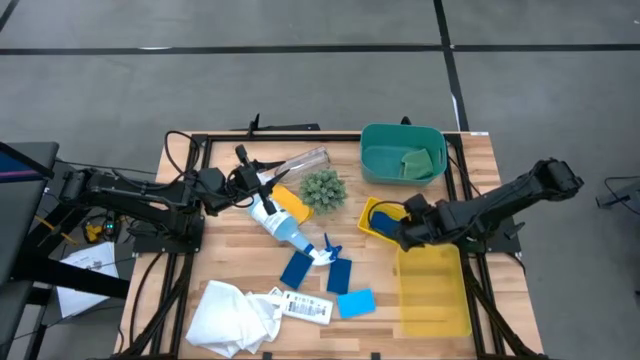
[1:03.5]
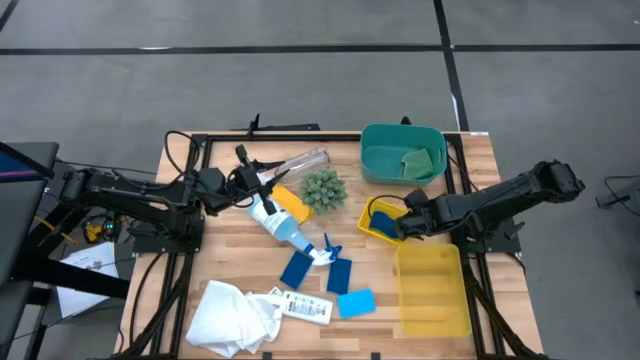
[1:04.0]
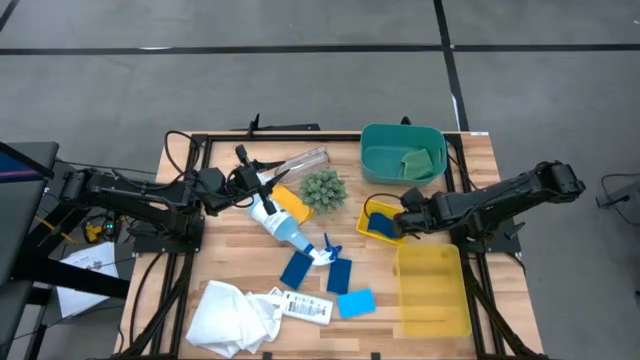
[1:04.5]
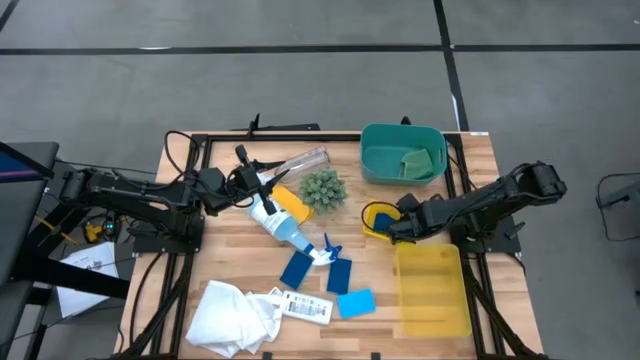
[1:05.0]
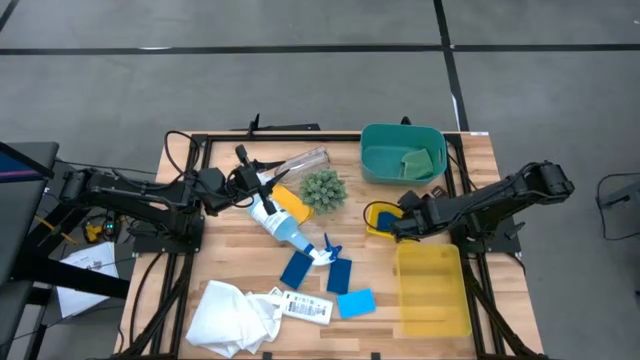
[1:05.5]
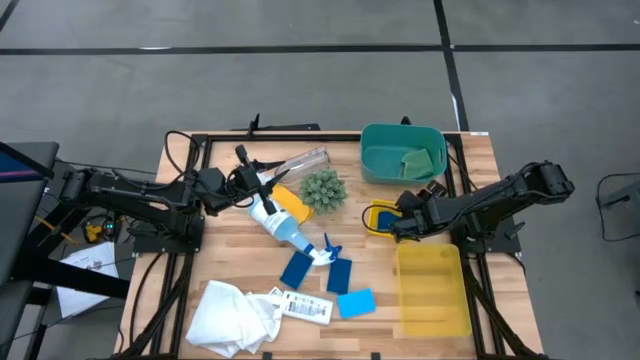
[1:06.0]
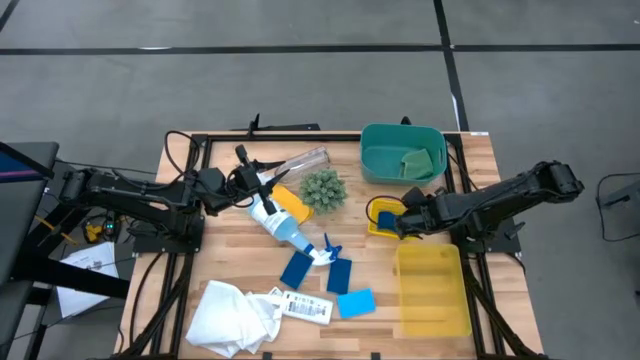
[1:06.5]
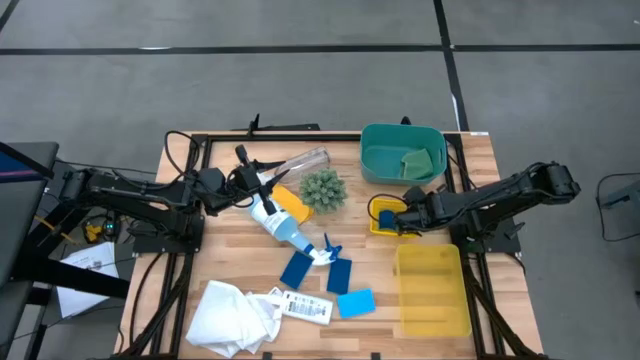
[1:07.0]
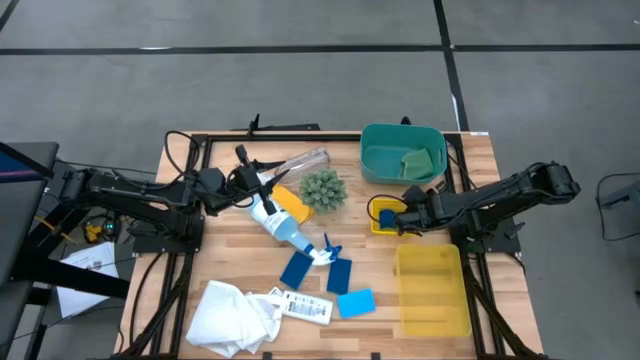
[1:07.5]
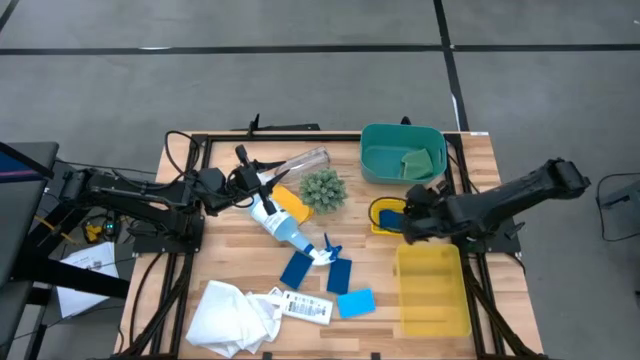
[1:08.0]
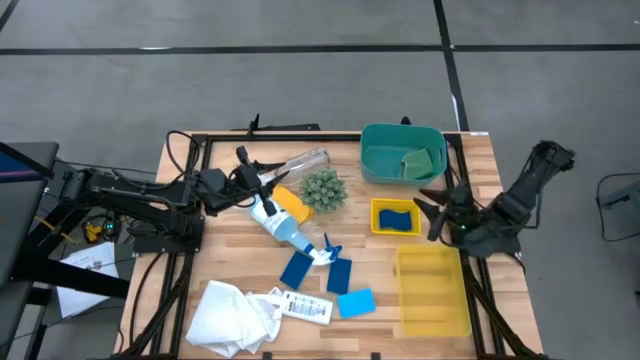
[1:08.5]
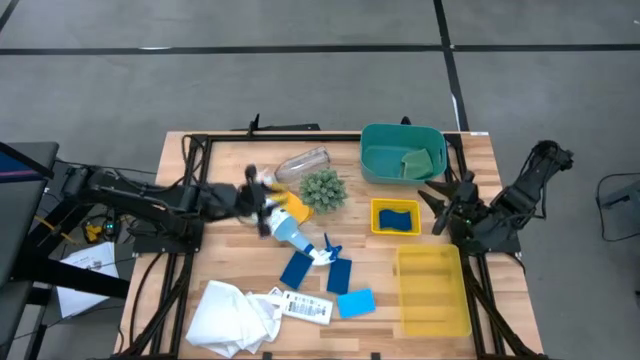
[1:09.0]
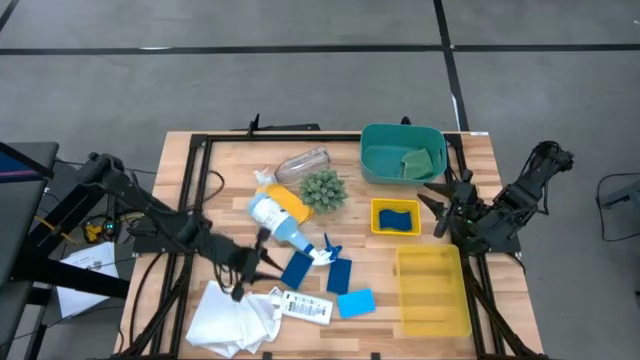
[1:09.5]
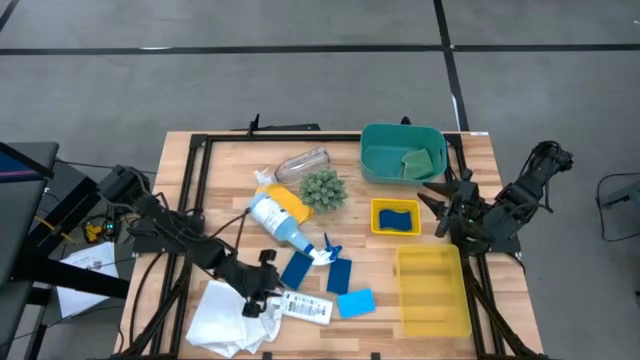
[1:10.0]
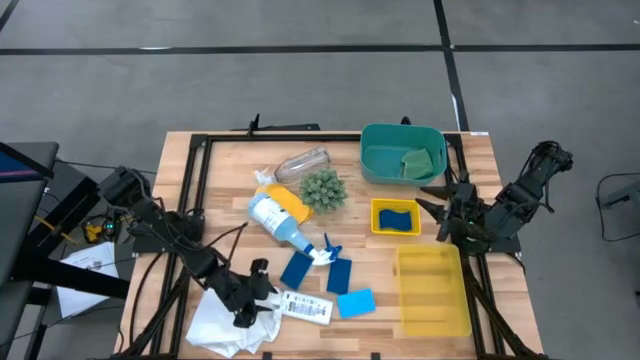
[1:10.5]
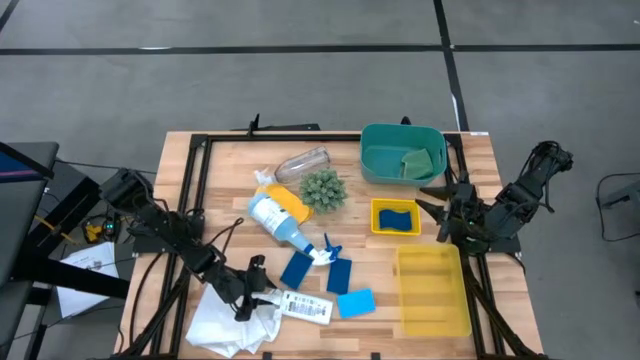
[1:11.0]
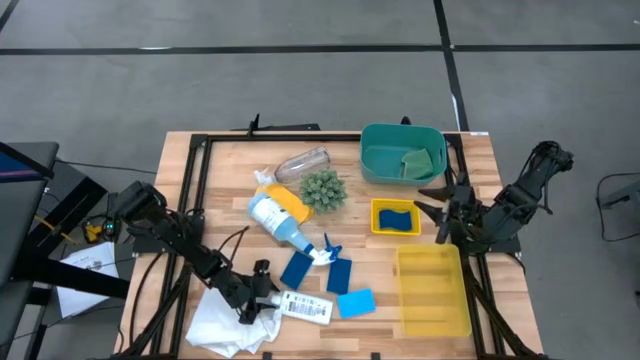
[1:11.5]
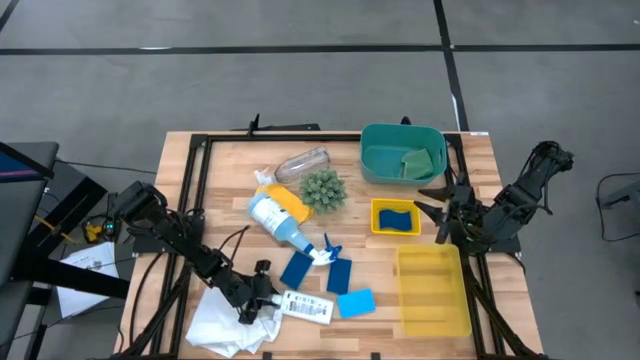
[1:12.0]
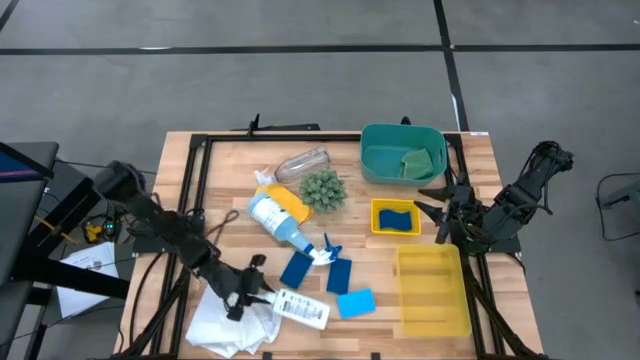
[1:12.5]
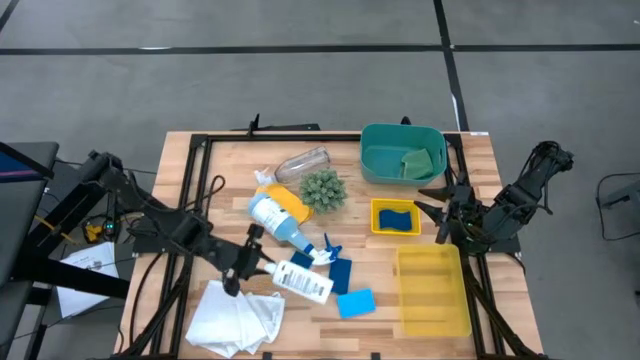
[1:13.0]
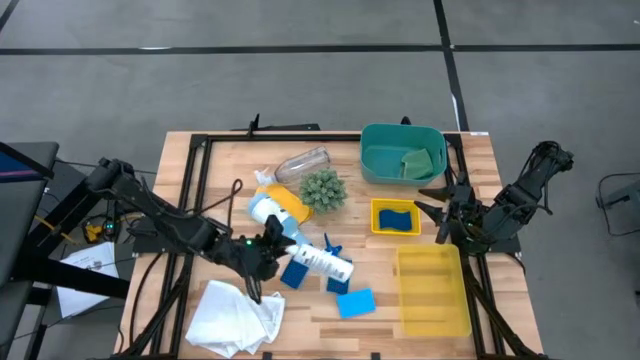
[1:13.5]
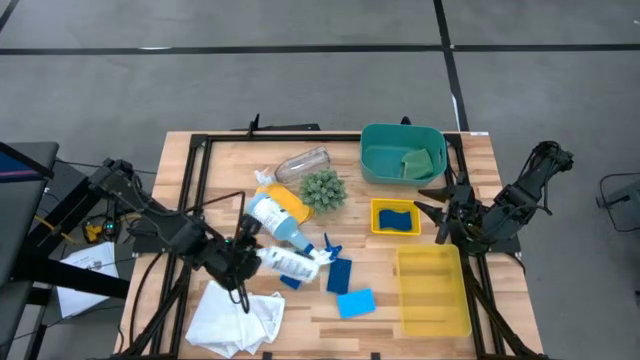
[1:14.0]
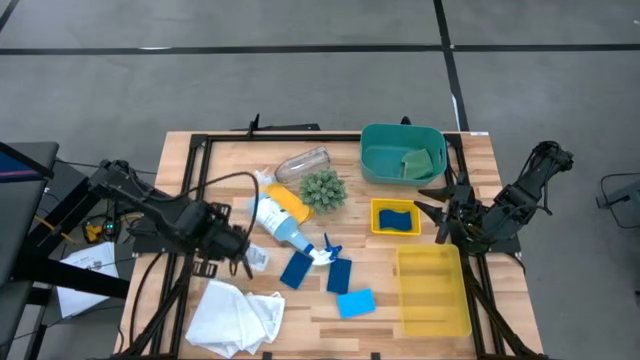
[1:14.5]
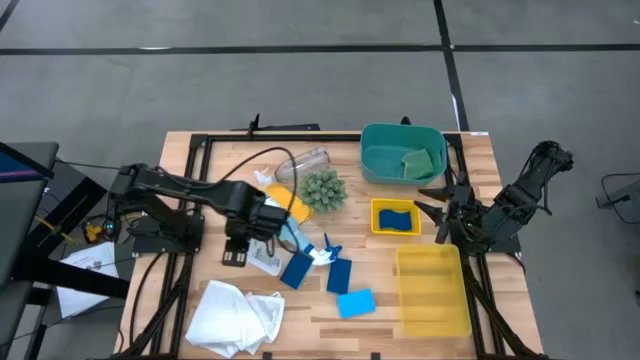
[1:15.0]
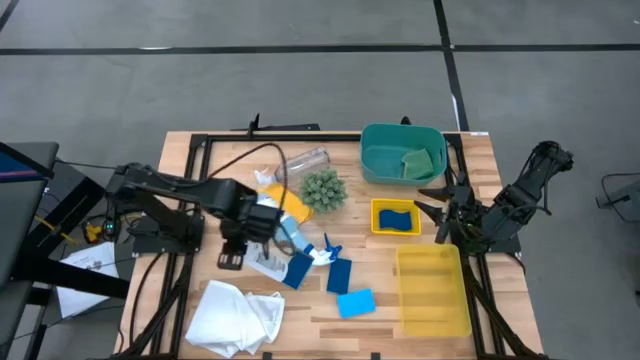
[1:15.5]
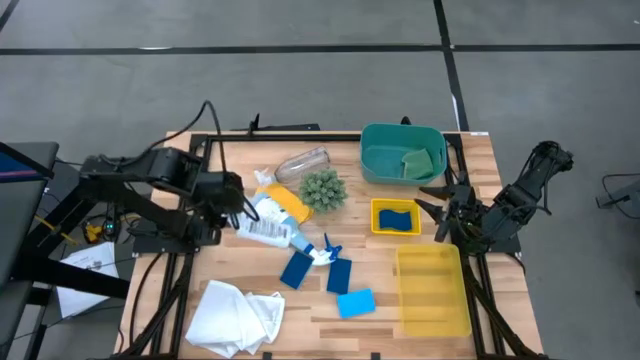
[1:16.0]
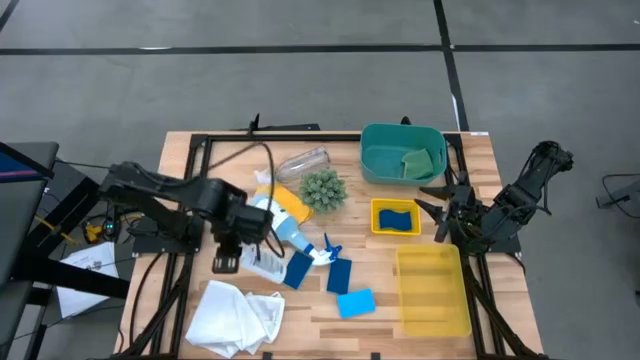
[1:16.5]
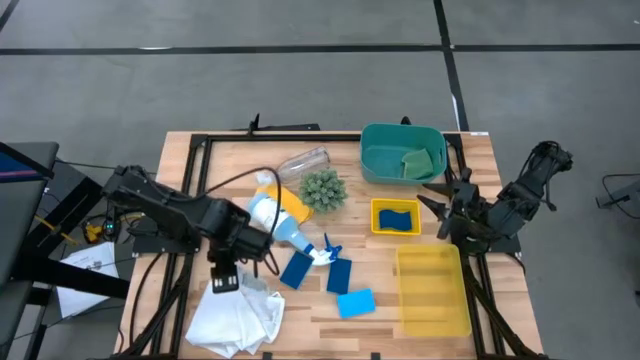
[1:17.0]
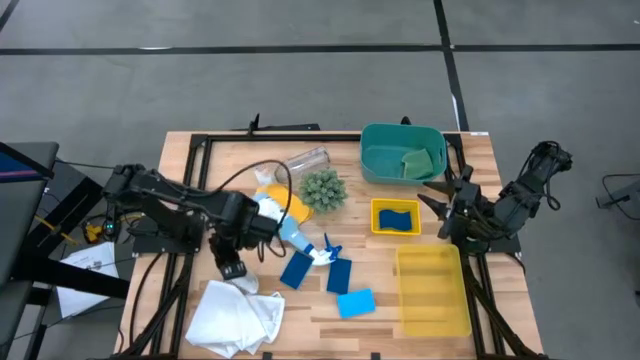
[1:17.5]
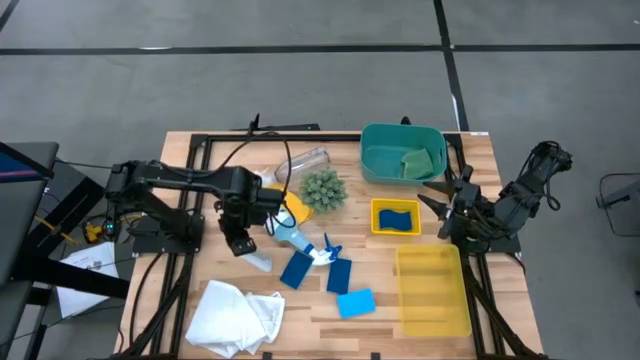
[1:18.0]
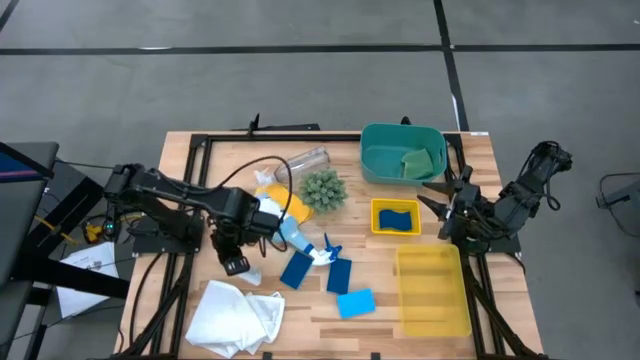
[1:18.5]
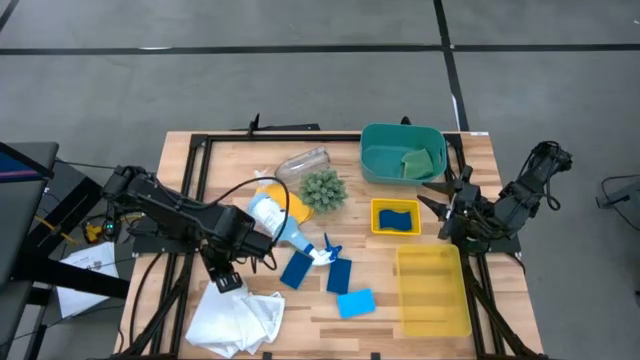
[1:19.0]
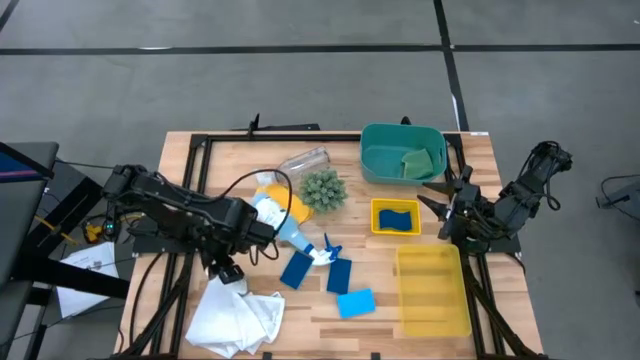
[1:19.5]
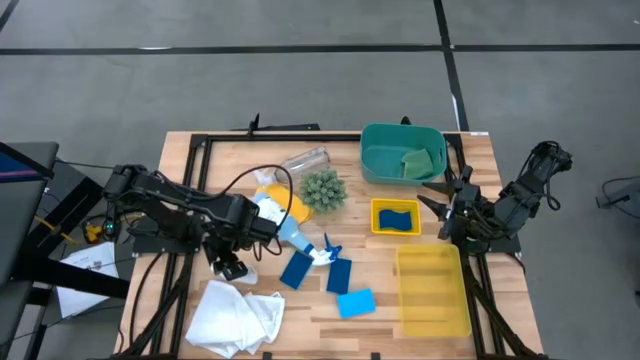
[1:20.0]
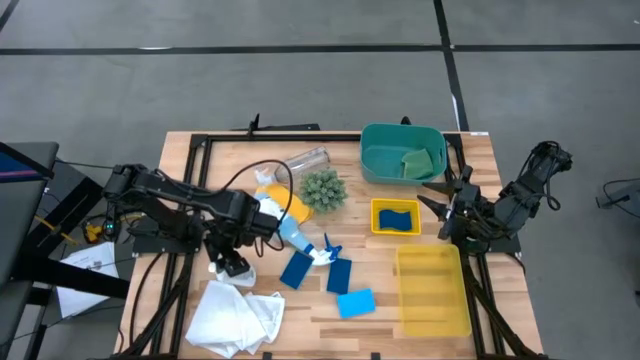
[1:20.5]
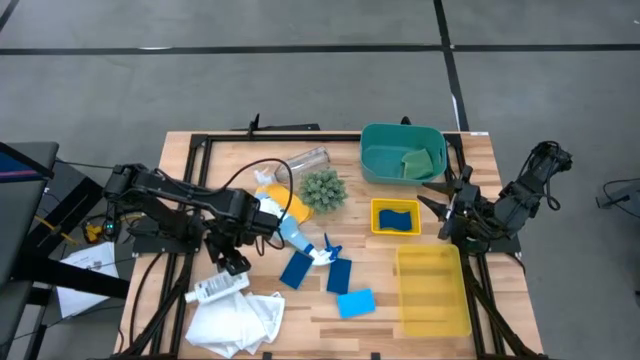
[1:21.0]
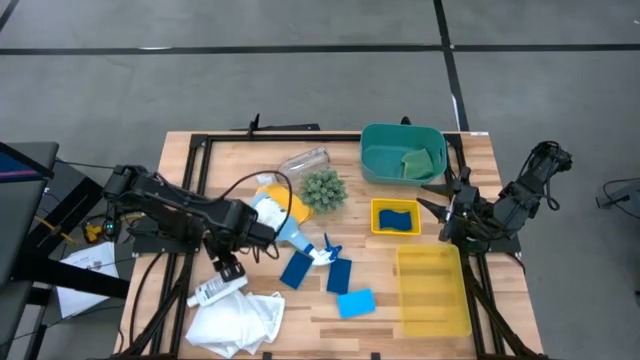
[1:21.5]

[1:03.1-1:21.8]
Task: Pick & Place Kitchen Items
Put the white bottle into the yellow bin

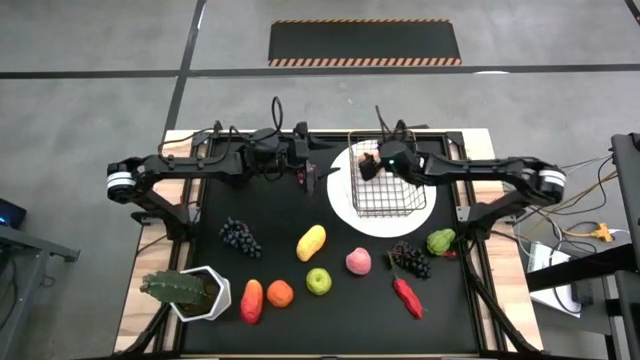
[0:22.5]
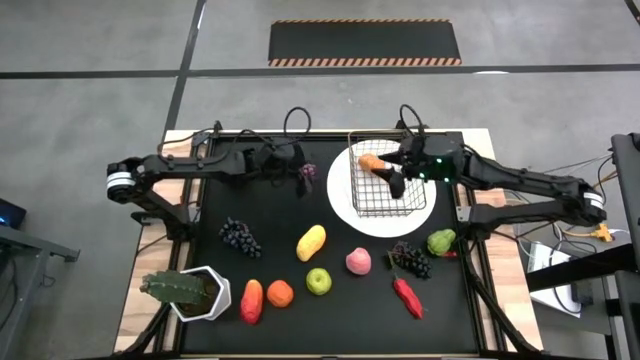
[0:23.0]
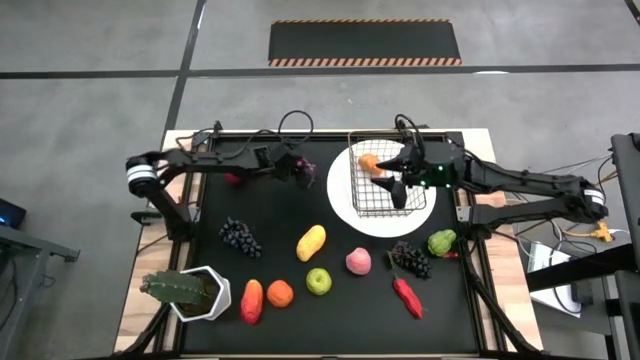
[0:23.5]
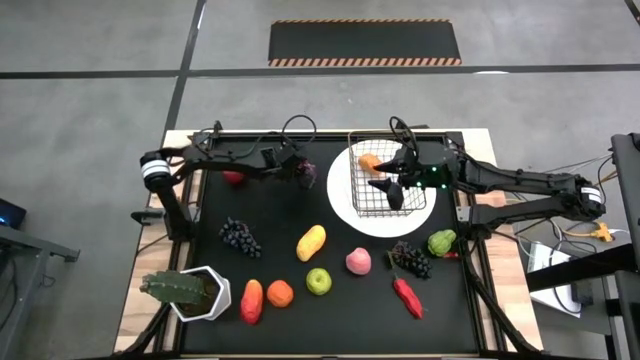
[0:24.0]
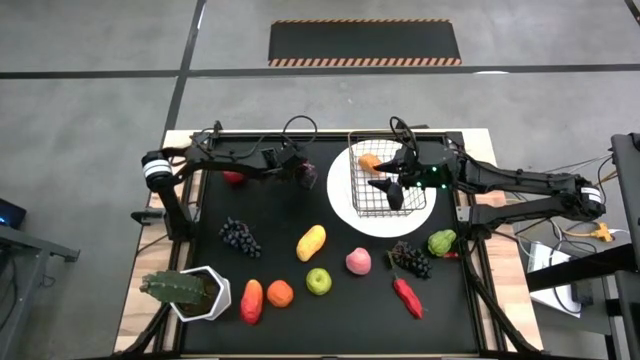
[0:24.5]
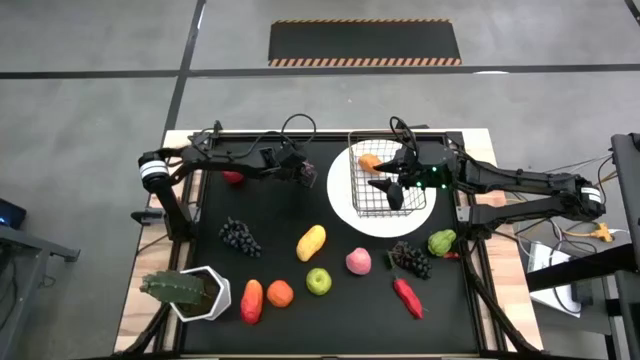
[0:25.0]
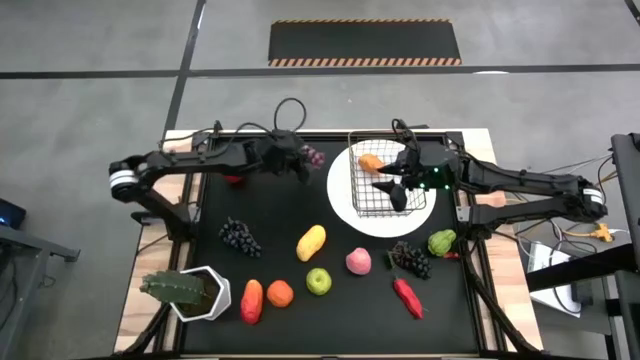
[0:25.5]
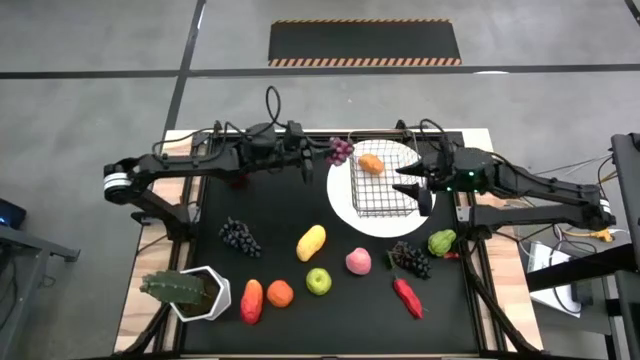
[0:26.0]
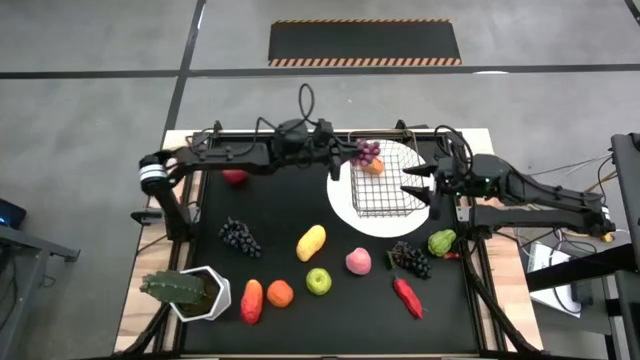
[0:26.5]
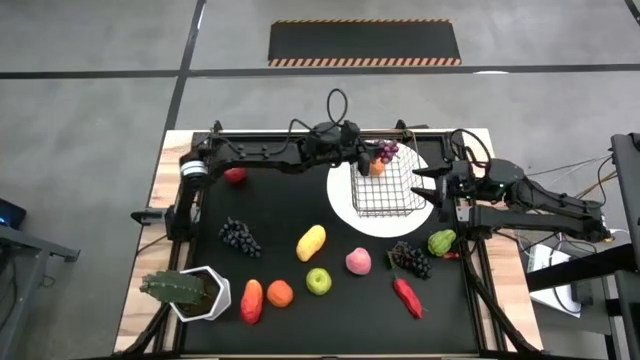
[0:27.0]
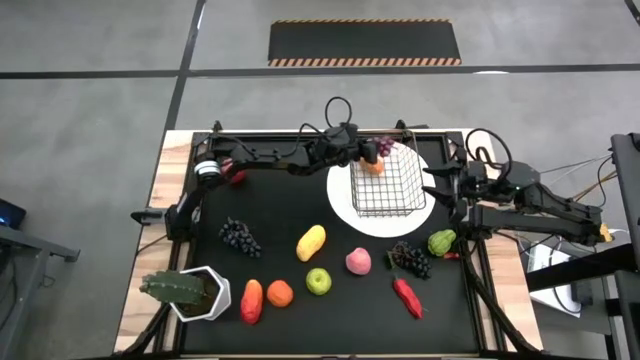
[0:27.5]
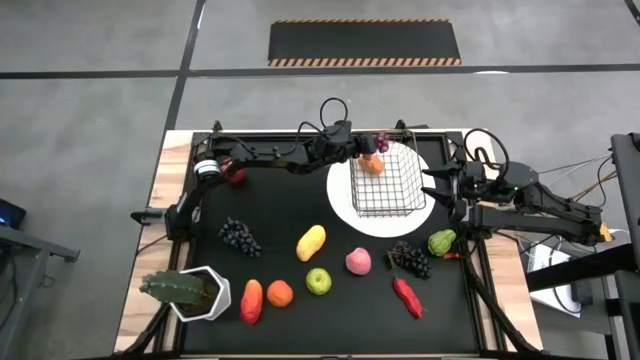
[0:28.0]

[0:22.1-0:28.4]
Task: Build produce basket
Put the red grapes into the wire basket
